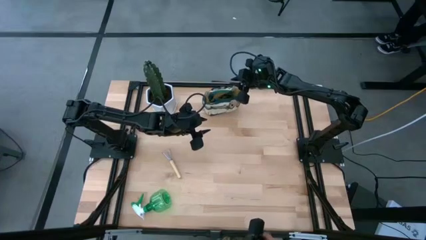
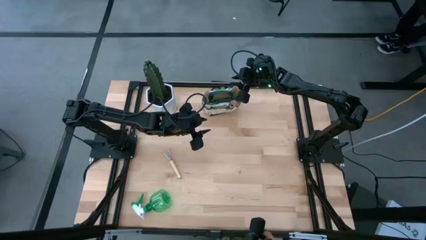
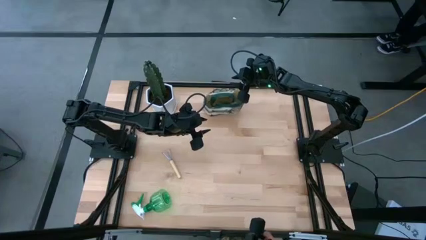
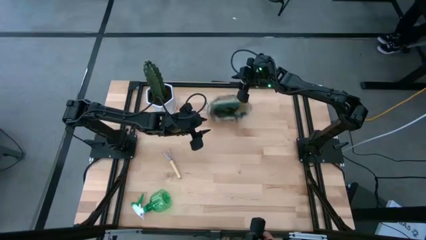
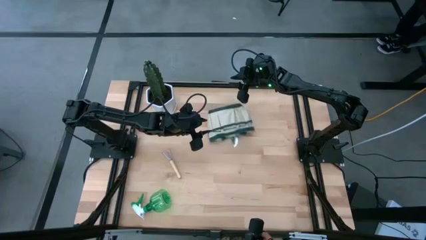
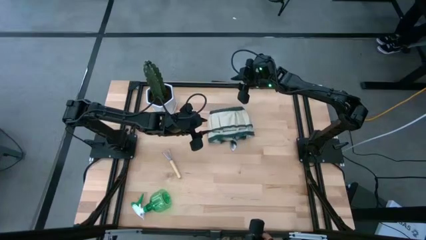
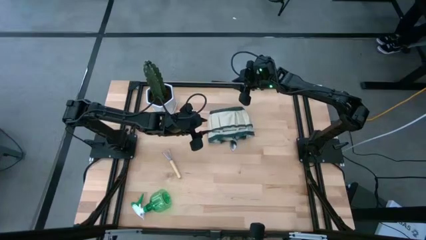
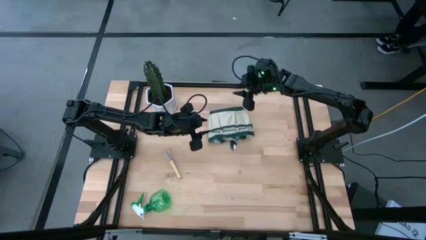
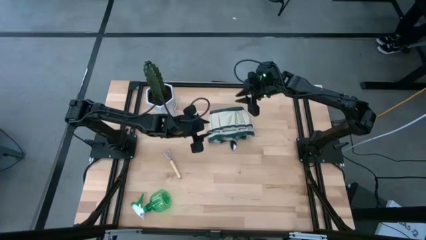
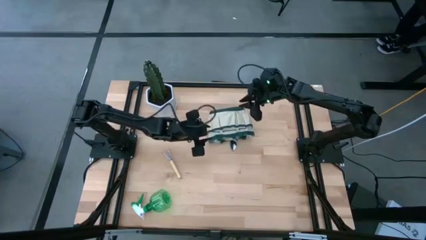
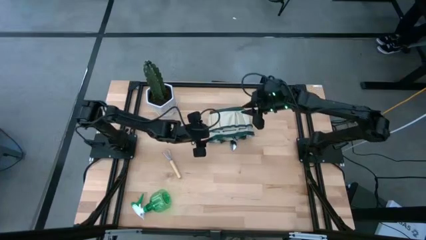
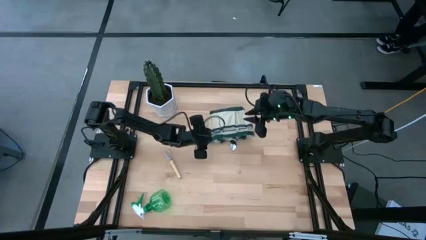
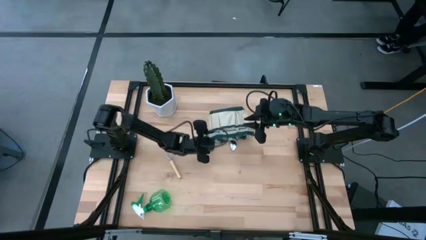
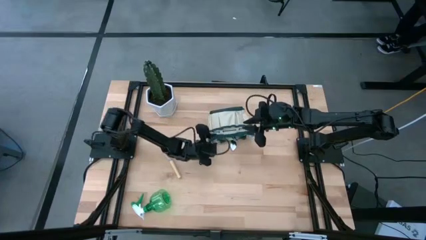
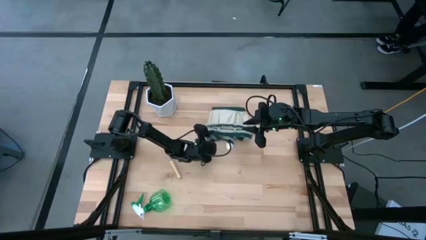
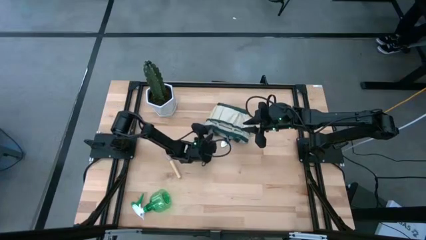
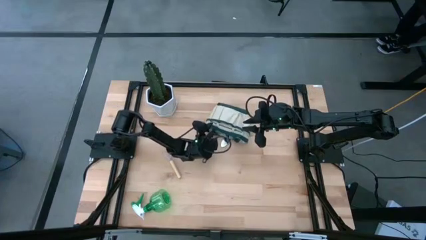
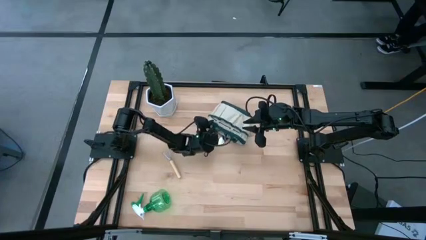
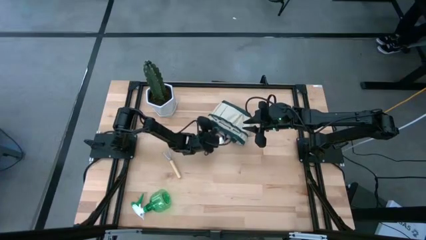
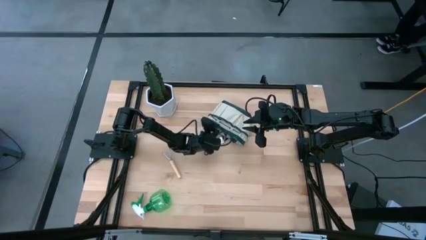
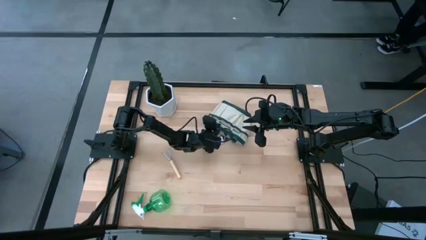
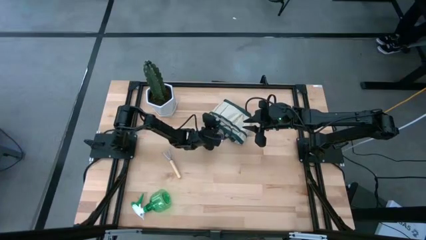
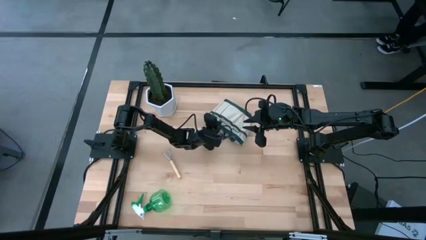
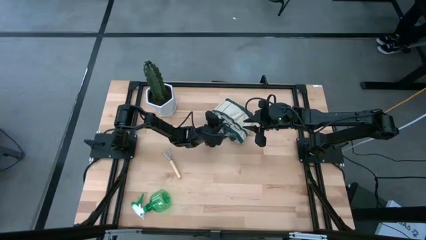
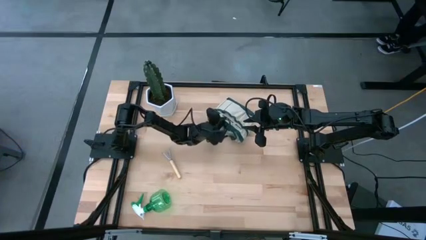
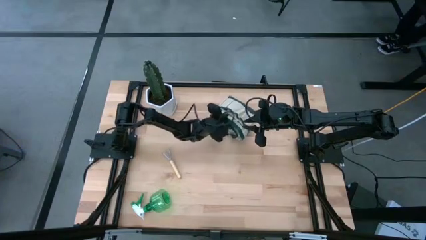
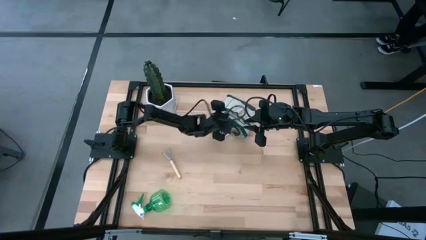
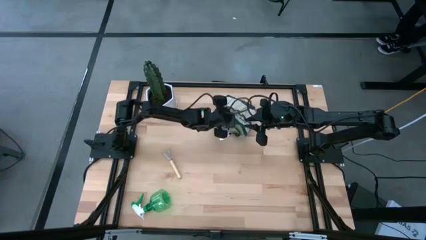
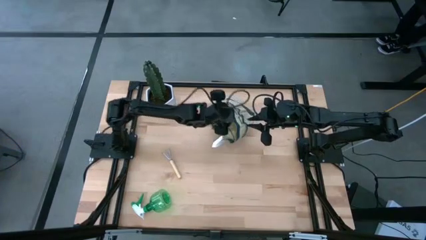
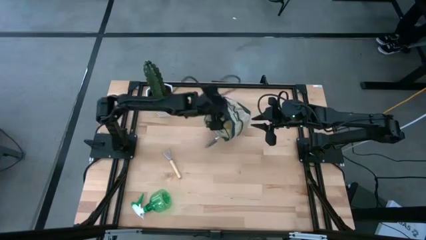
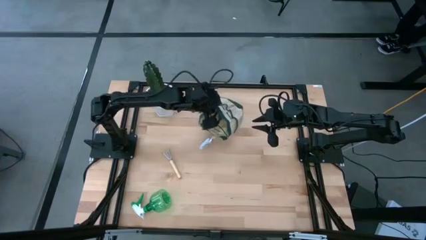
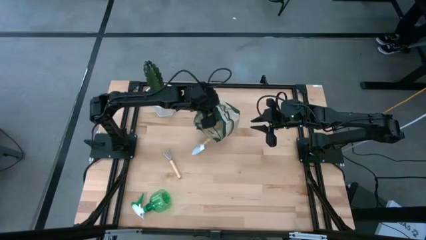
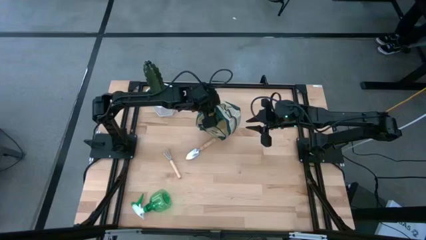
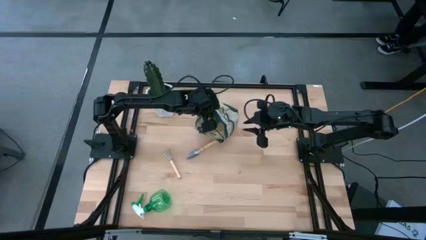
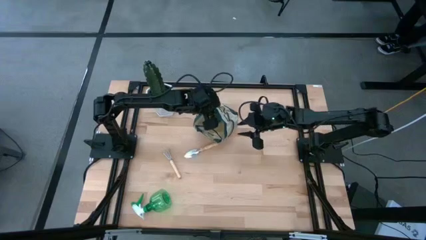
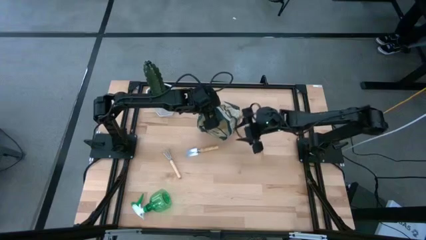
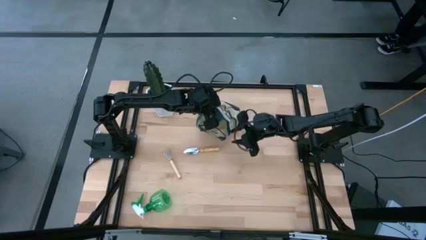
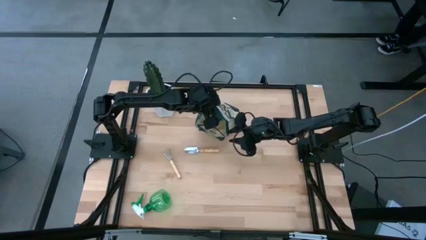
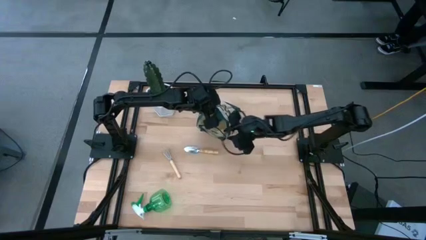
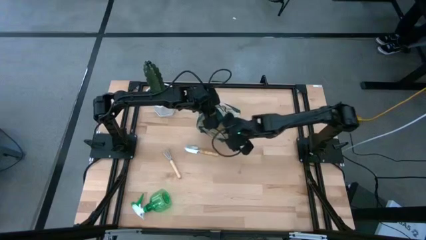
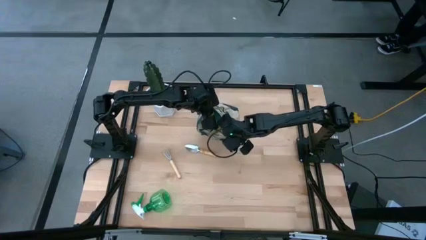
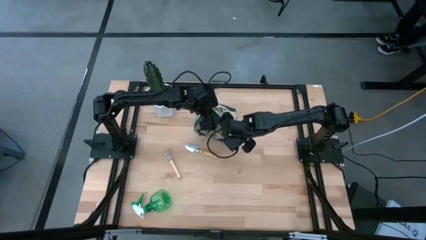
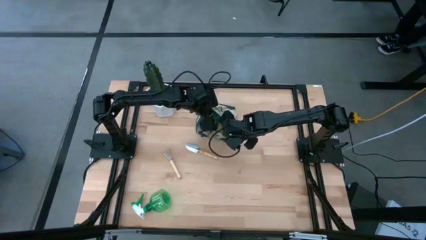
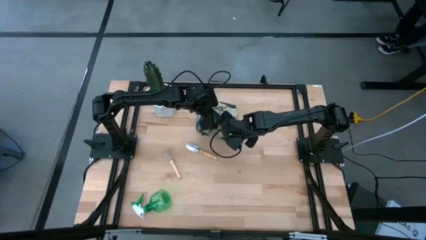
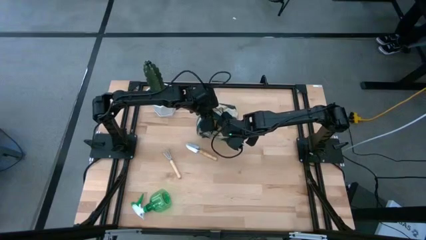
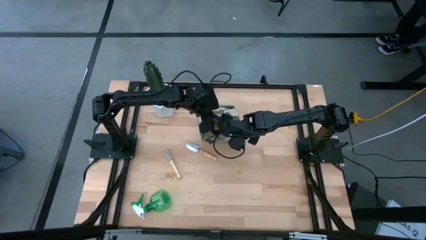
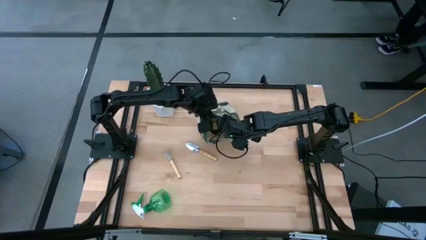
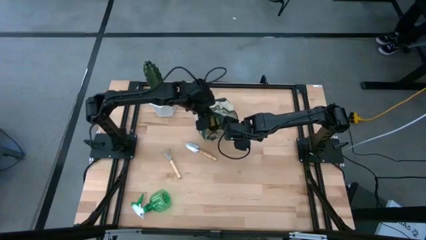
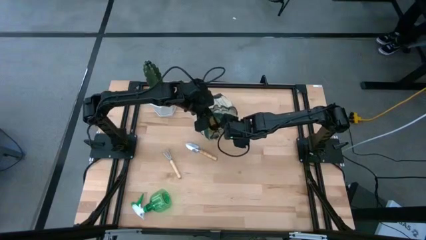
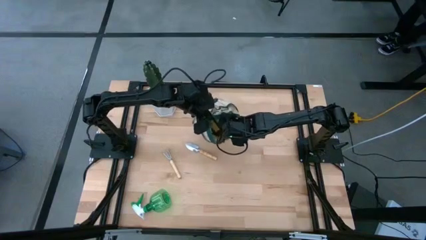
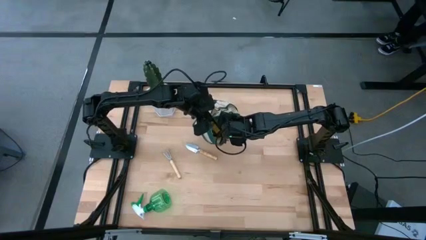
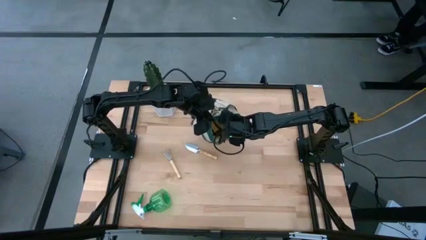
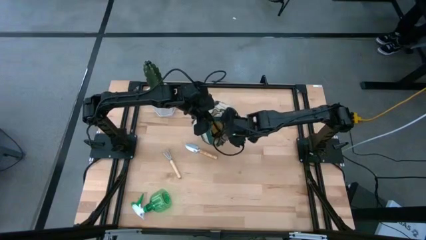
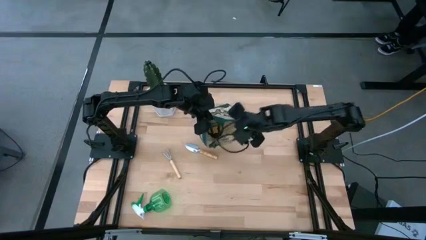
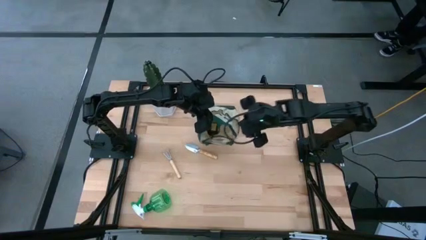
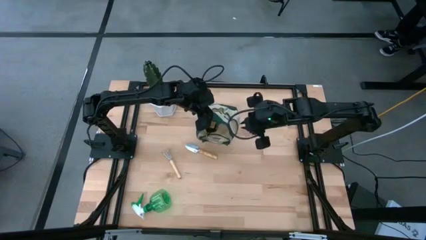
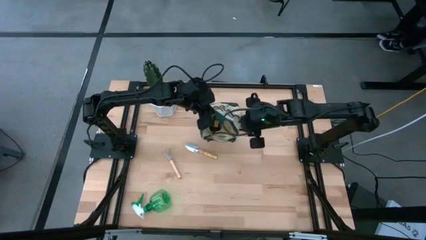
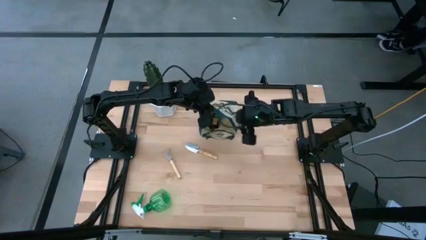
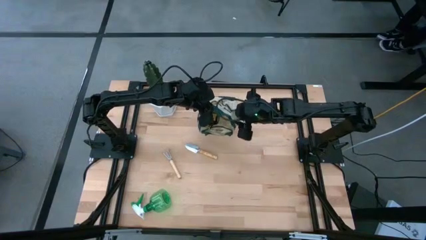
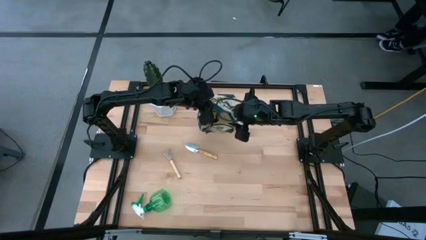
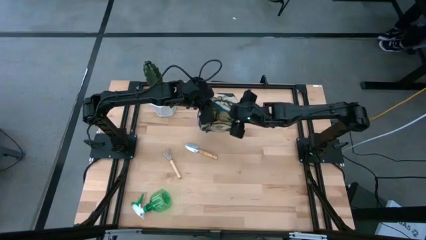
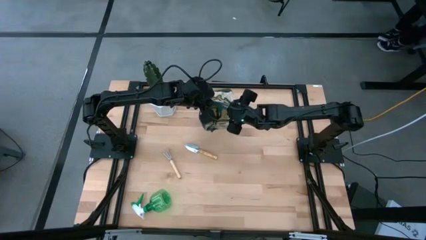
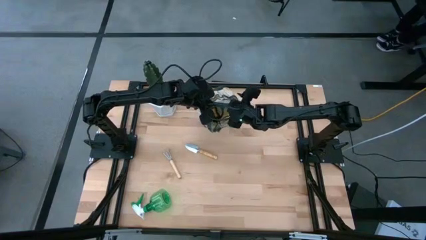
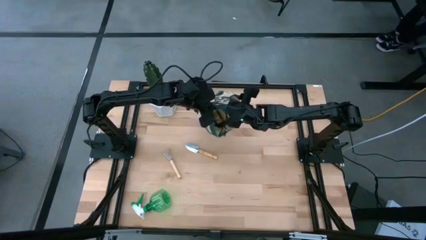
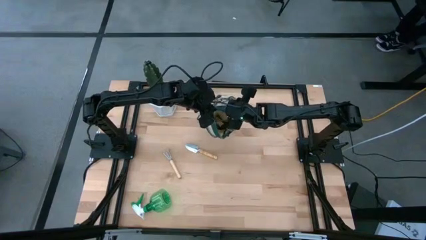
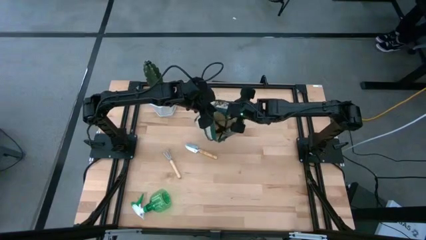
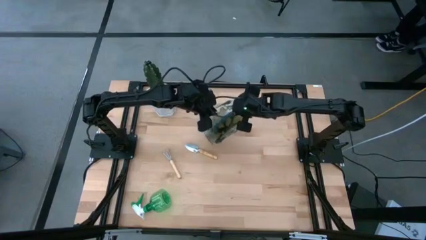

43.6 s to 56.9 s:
Task: Pick & Place Garden tools in Gardening bag
Adjust the gardening bag

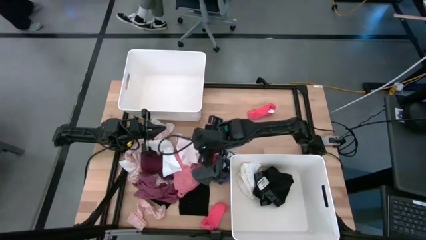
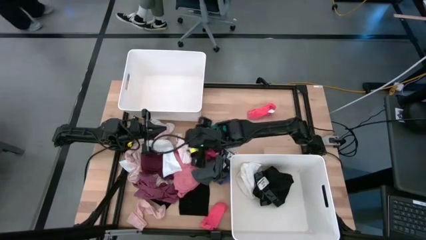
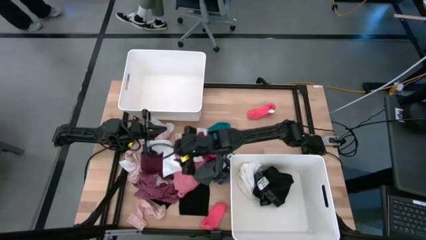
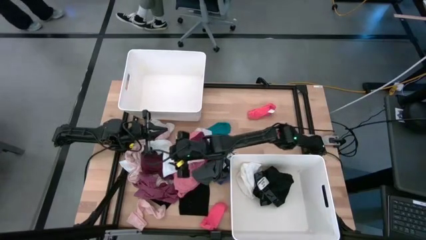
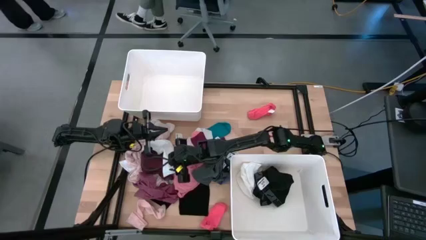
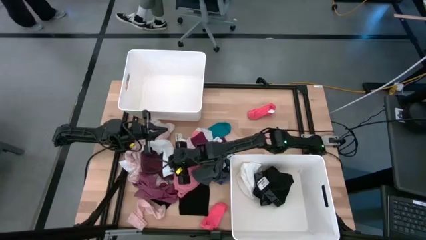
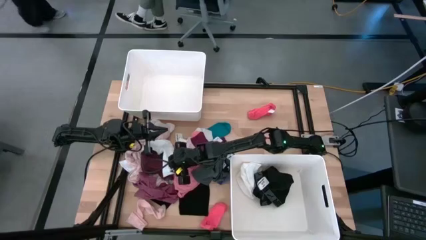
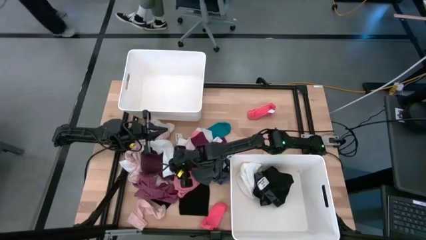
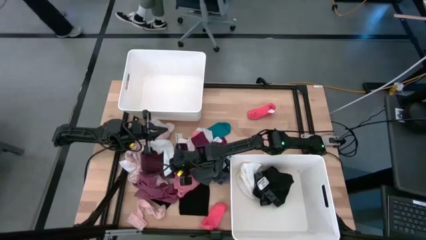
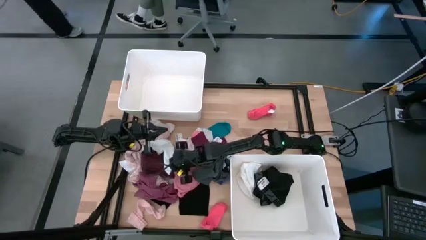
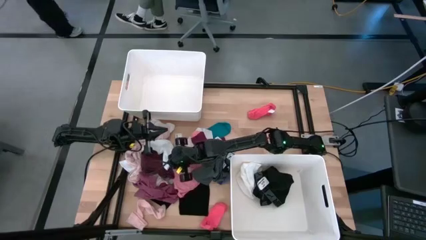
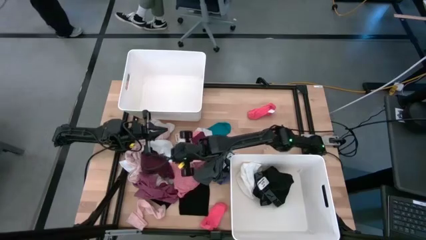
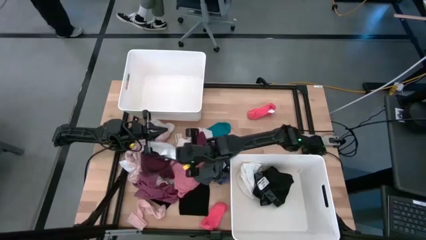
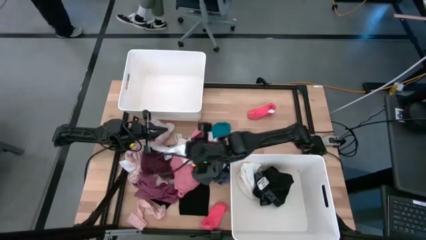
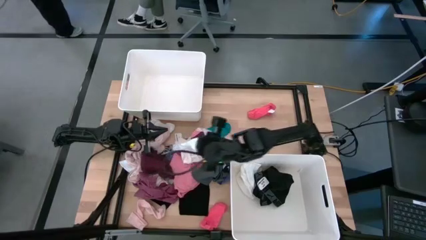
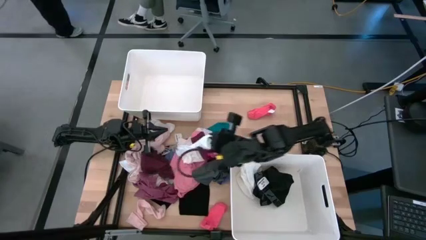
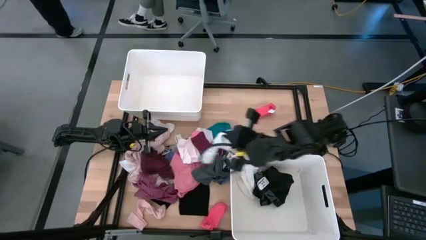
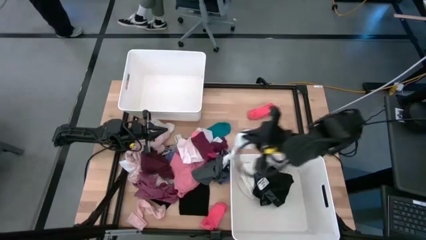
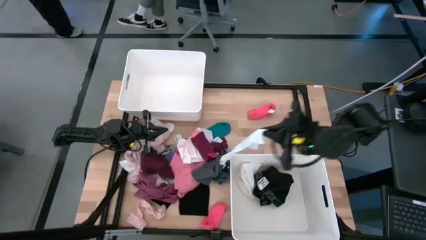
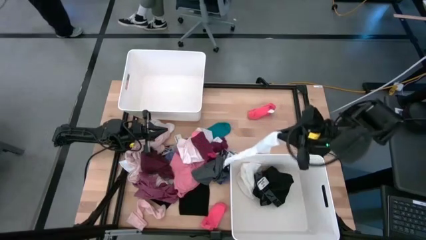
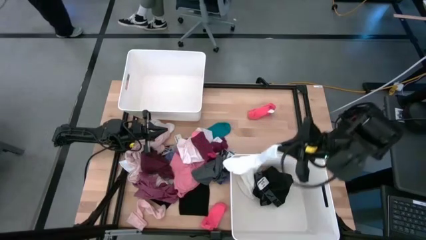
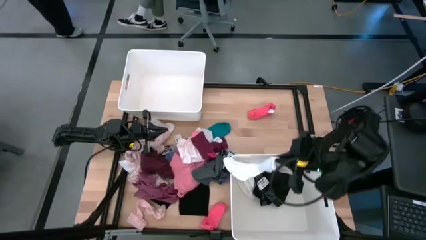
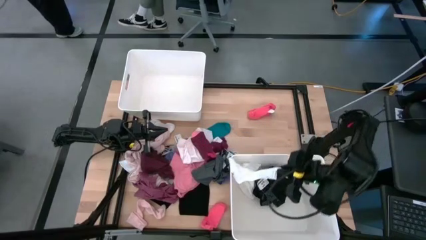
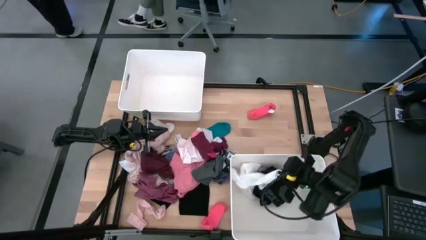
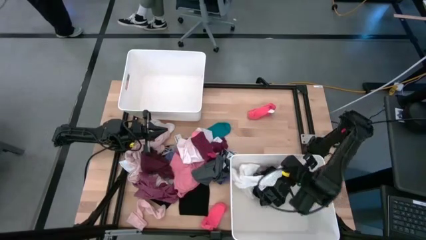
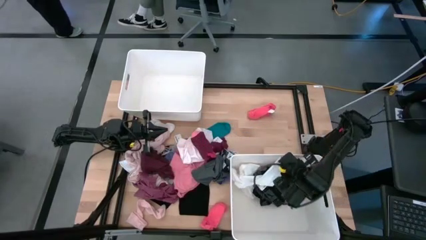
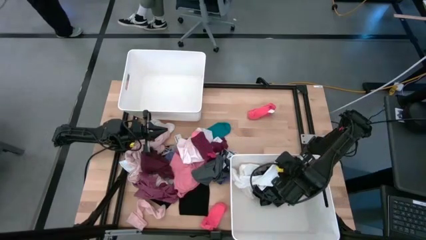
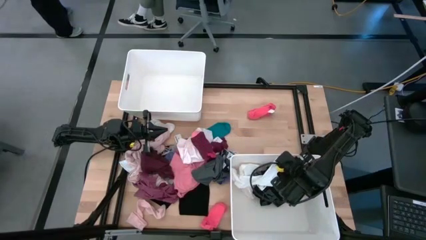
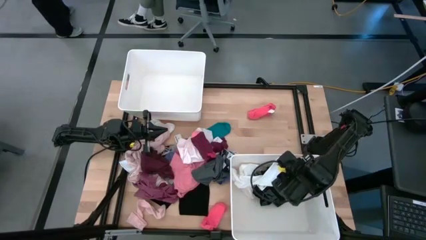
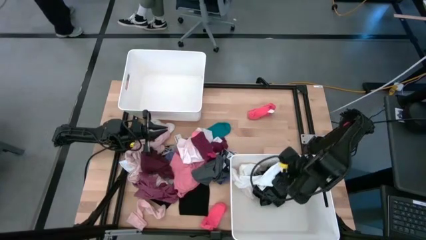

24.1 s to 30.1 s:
Task: Sort clothes
Put the white sock into the bottom white bin
